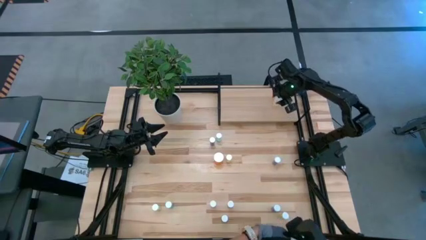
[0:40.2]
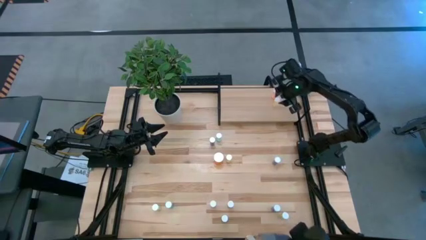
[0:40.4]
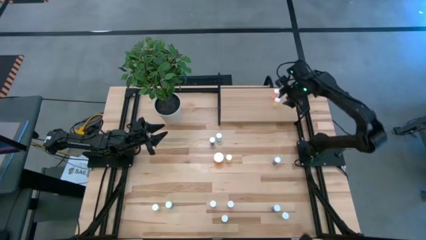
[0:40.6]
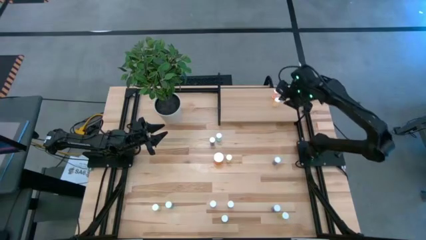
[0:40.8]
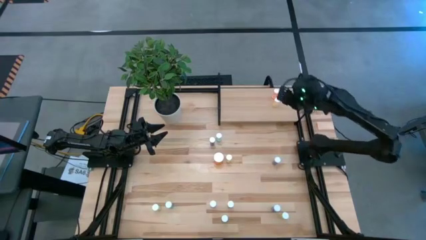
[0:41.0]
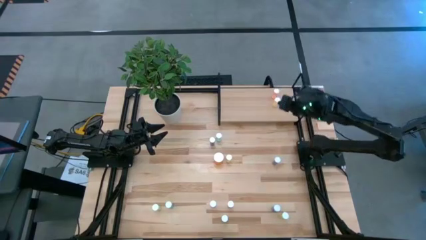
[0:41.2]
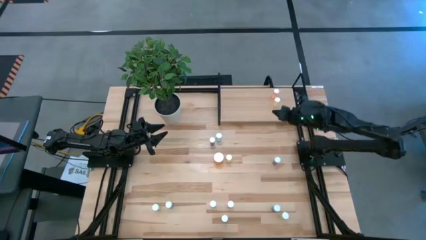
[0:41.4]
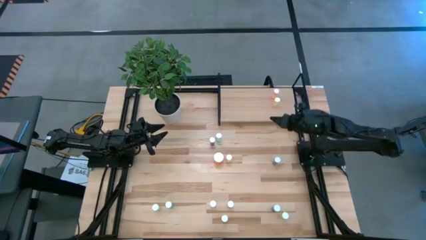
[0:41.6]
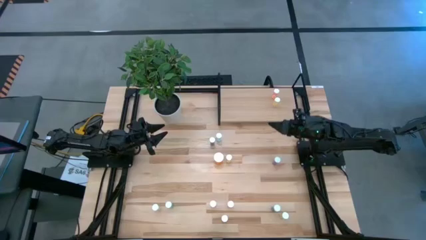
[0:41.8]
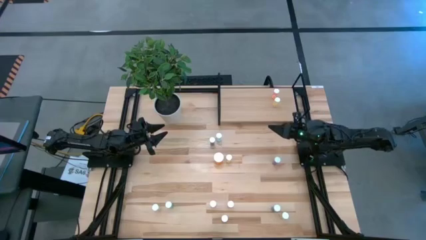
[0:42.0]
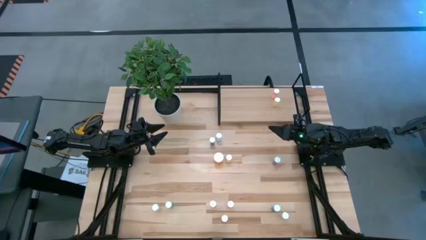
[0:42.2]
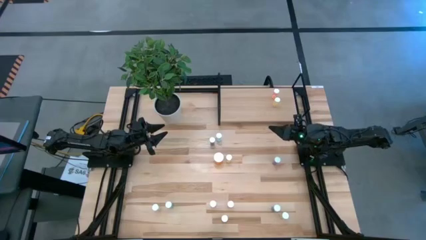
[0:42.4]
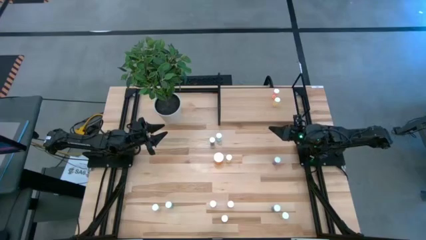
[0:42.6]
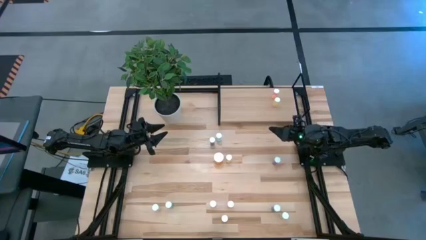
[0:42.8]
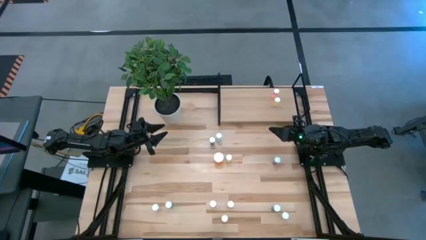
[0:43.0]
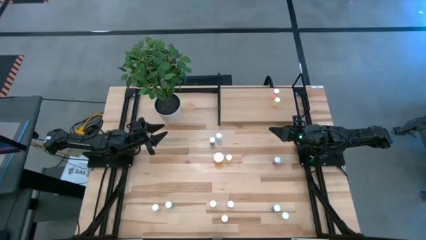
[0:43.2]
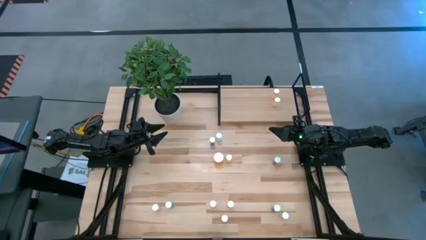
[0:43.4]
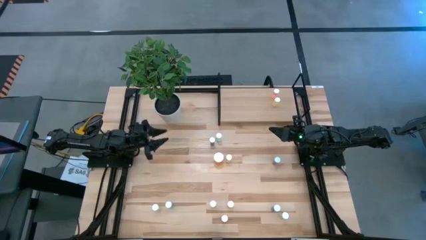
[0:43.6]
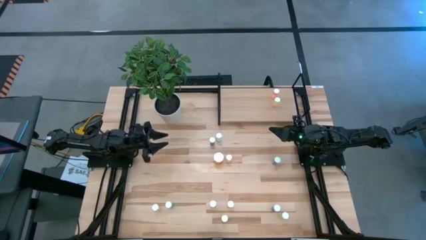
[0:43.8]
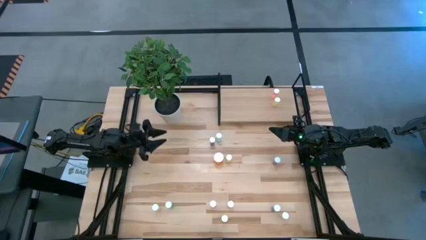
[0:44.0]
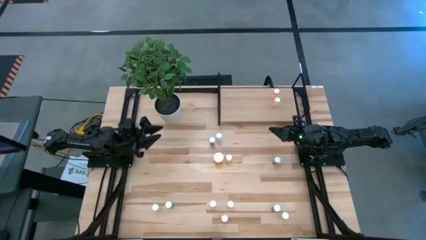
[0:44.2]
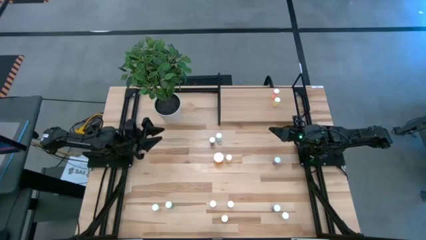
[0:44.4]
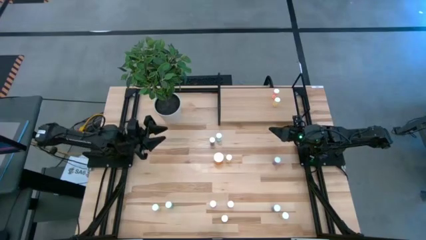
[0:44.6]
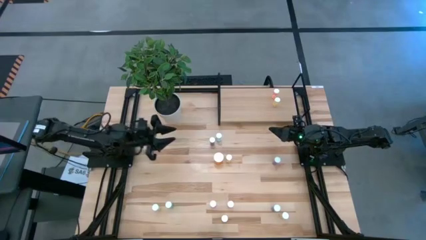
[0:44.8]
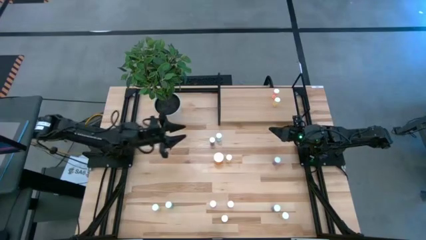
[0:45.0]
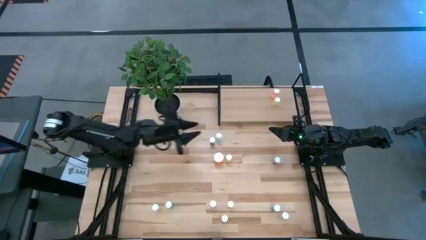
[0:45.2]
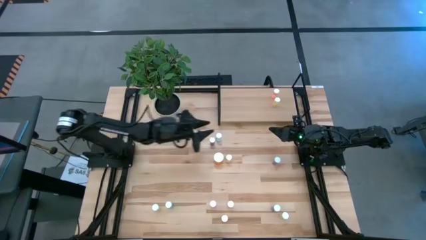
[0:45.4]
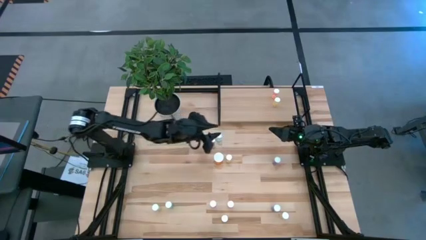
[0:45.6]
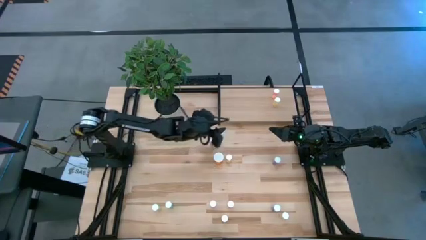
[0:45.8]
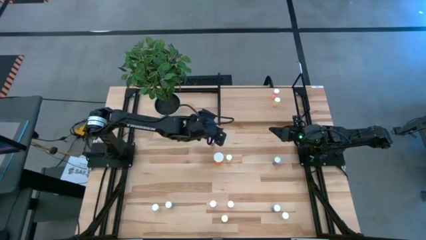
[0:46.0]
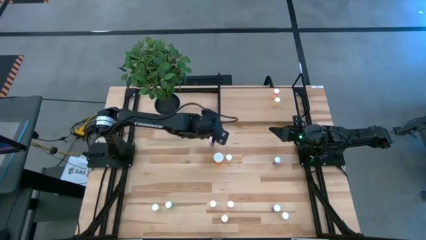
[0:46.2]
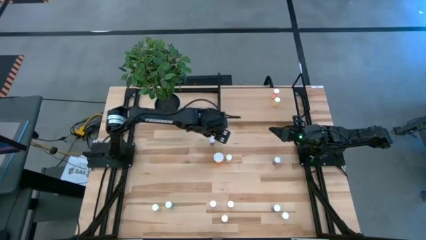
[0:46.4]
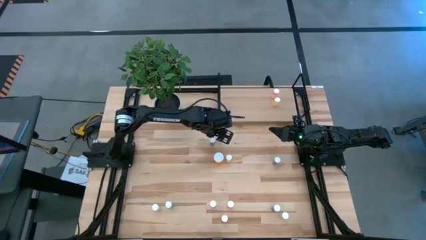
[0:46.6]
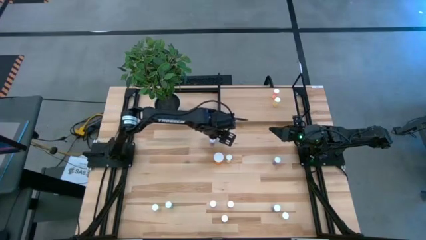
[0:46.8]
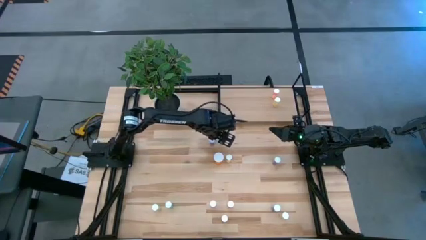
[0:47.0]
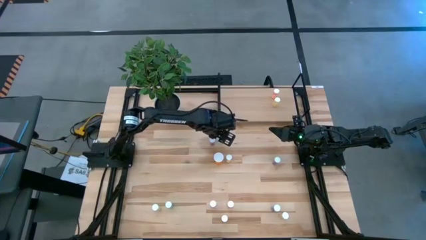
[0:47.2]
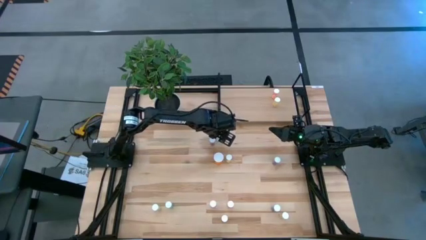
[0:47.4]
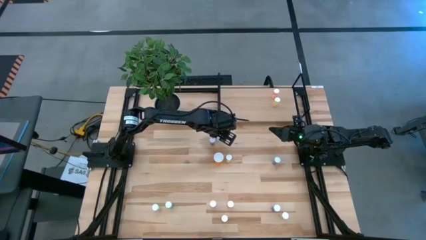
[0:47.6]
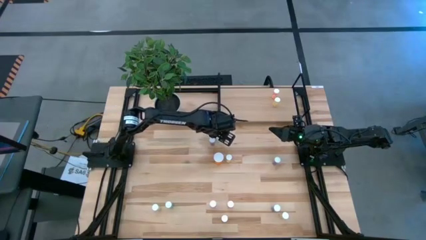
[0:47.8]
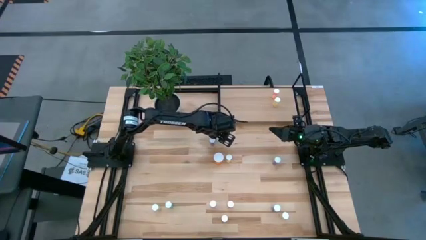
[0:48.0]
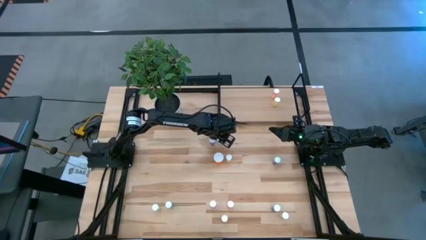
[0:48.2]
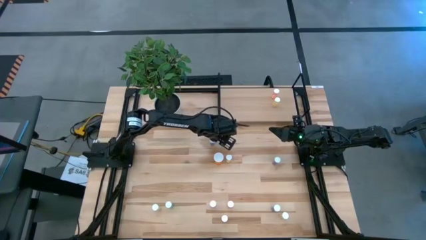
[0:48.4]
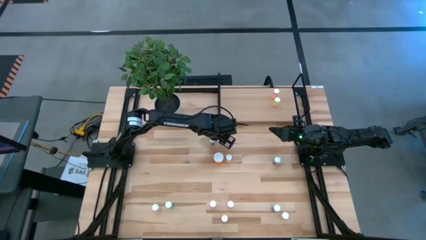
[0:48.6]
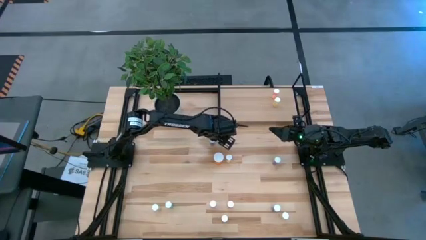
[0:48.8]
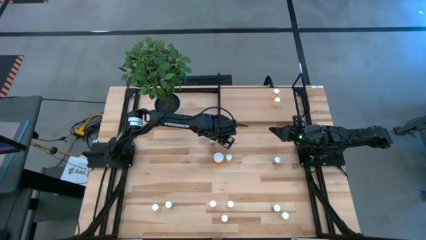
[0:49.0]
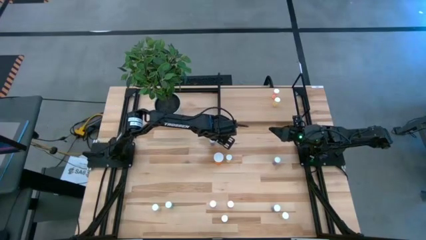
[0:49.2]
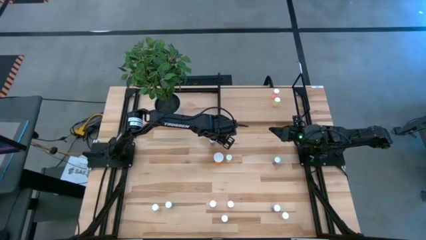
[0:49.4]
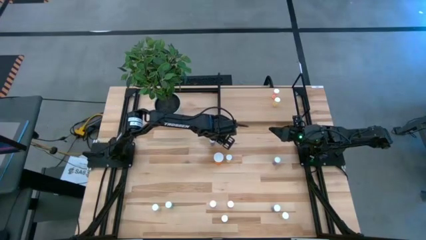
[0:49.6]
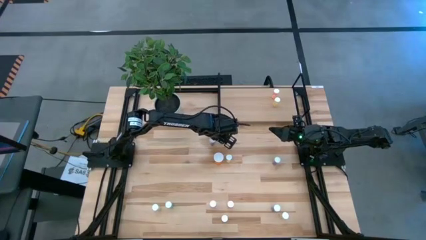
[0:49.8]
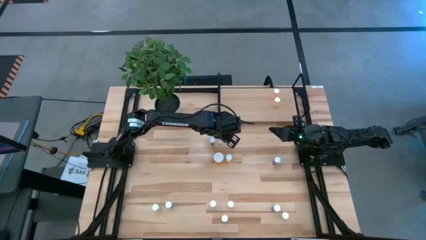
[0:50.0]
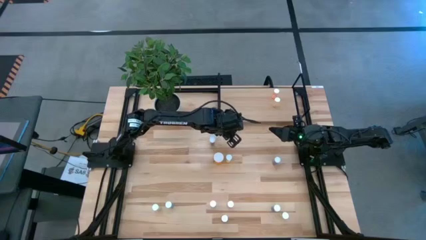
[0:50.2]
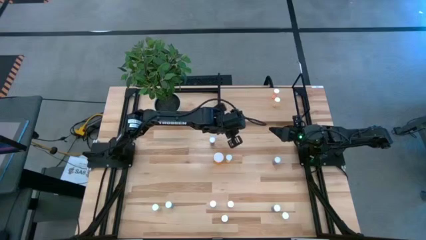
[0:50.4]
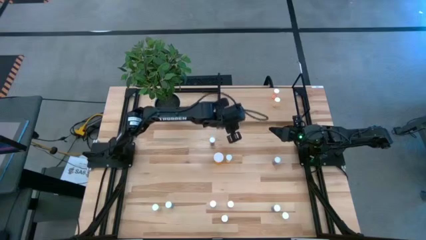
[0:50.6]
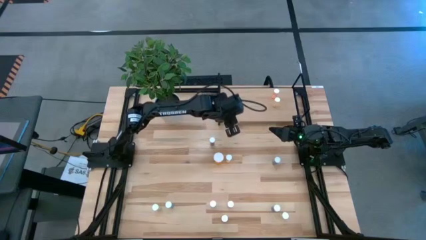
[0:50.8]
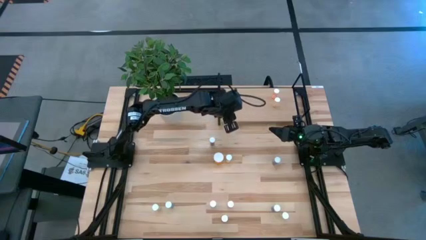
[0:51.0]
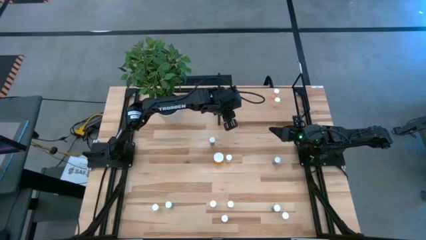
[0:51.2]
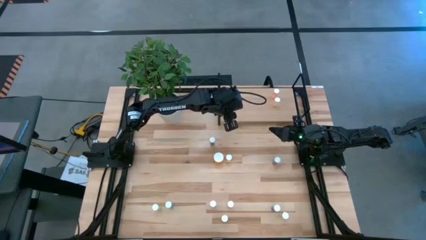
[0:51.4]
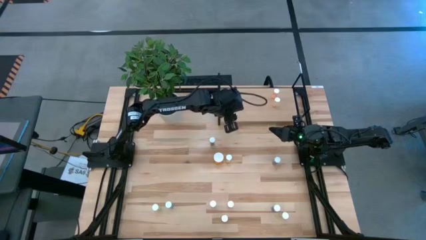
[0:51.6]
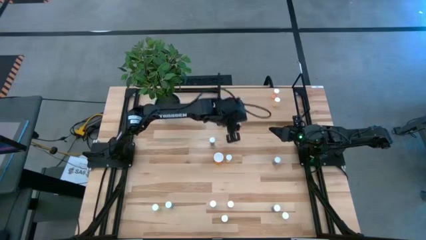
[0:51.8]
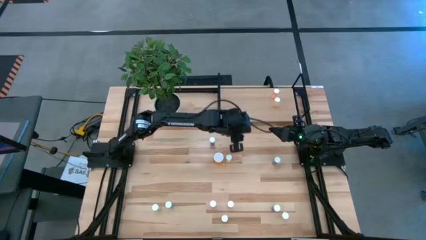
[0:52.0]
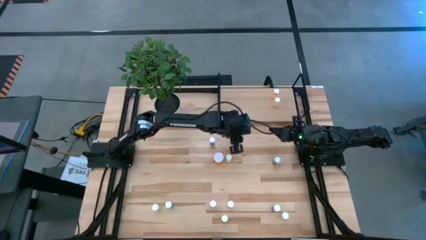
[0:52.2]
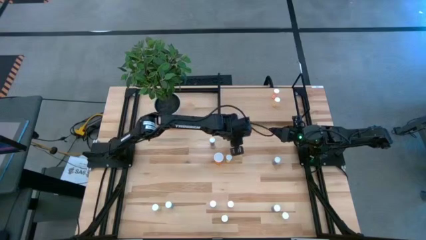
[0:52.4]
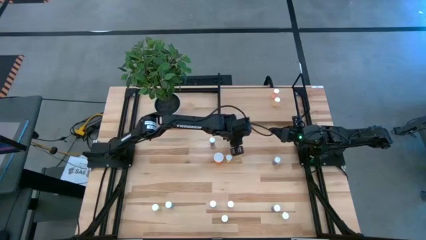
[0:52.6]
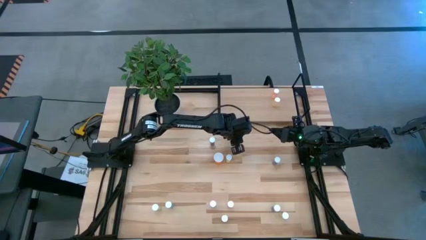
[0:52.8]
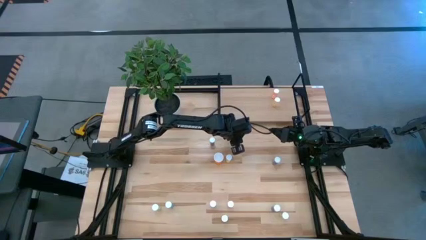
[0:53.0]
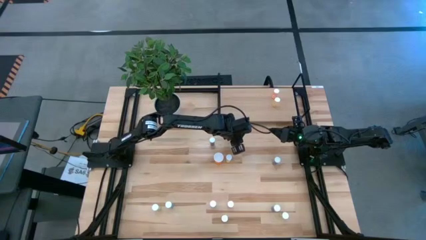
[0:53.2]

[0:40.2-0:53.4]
Task: Pick and place medicine bottles onto shelf by color
Put the green pill bottle on the shelf

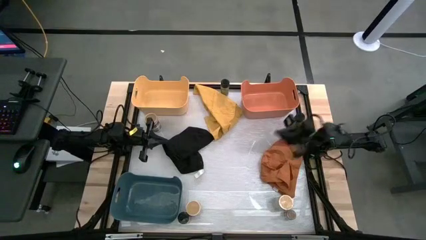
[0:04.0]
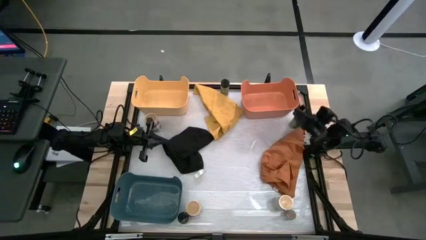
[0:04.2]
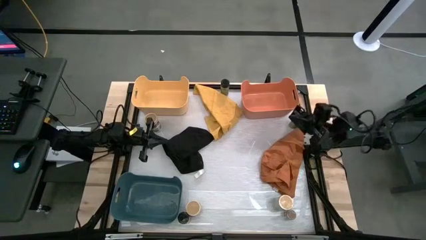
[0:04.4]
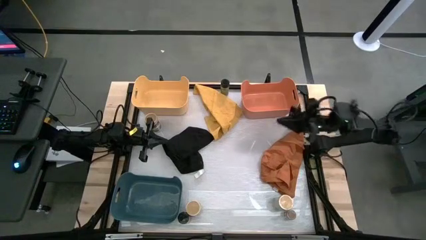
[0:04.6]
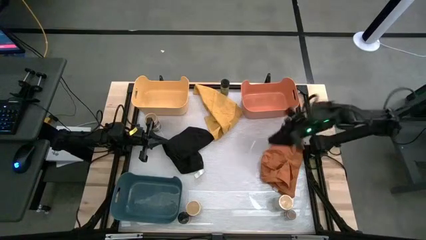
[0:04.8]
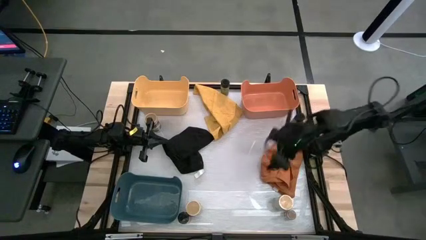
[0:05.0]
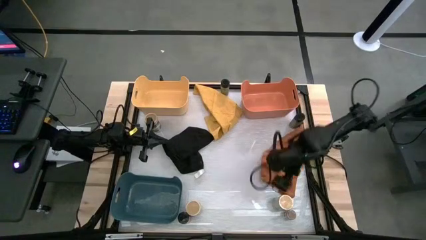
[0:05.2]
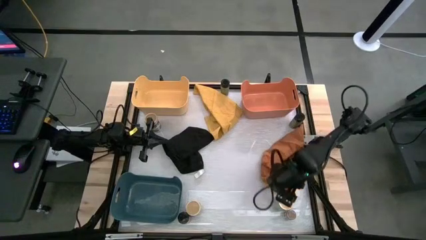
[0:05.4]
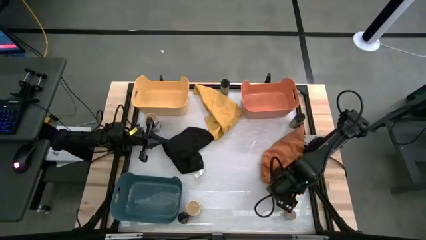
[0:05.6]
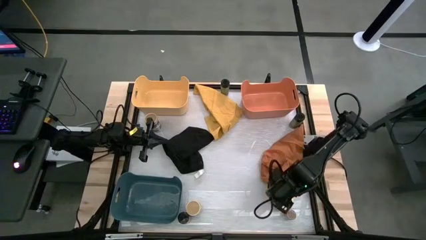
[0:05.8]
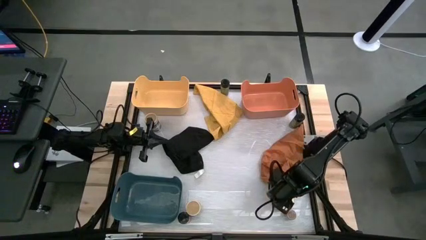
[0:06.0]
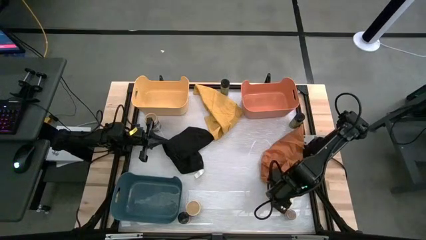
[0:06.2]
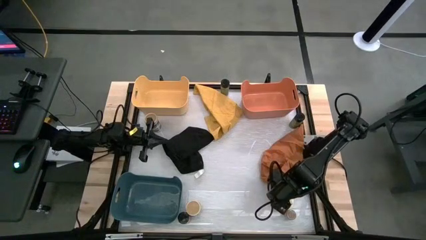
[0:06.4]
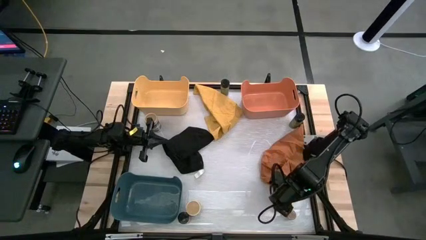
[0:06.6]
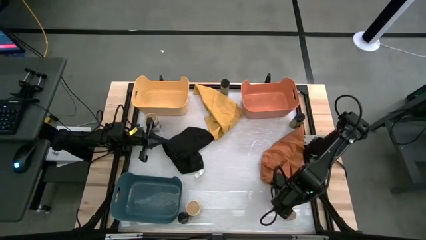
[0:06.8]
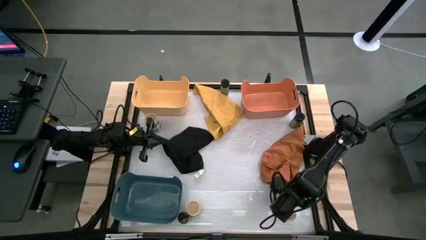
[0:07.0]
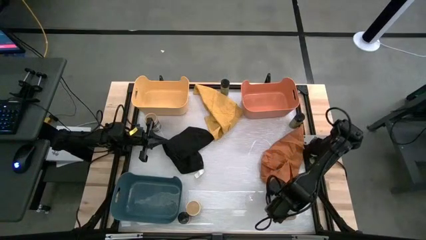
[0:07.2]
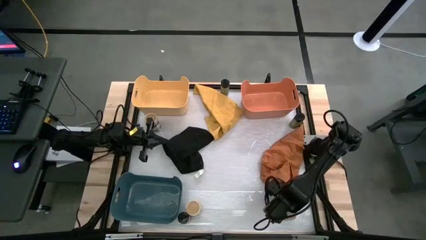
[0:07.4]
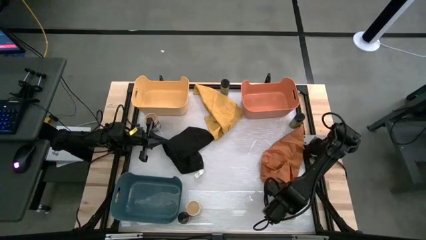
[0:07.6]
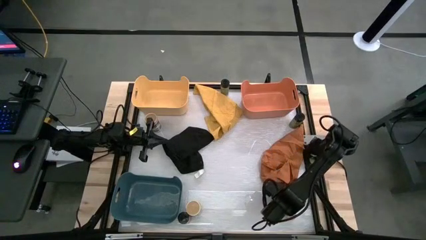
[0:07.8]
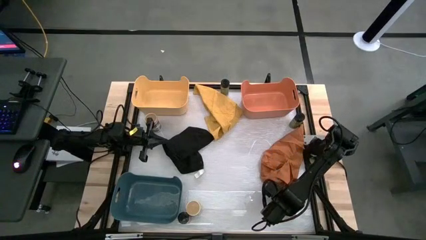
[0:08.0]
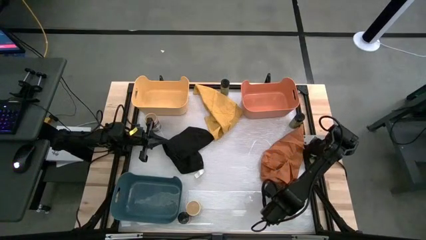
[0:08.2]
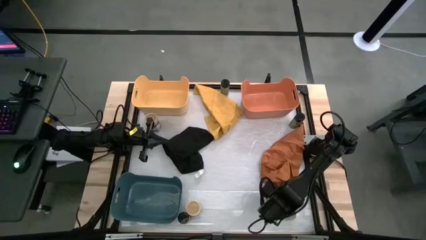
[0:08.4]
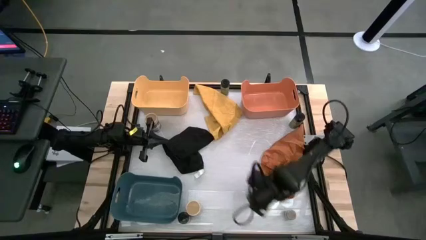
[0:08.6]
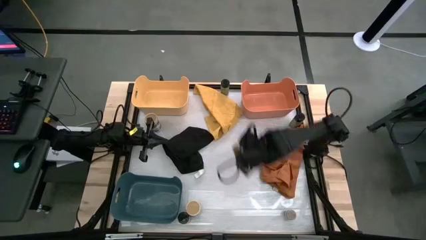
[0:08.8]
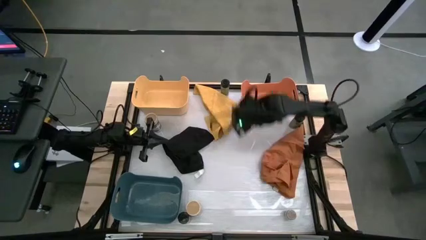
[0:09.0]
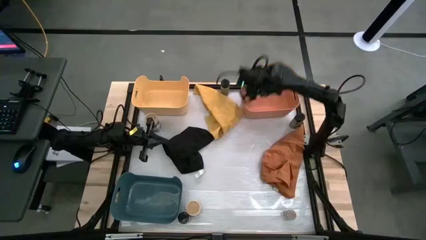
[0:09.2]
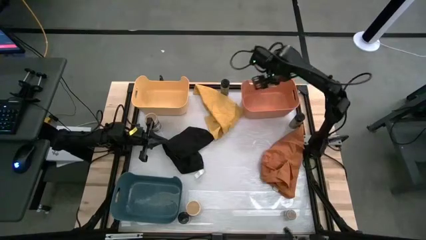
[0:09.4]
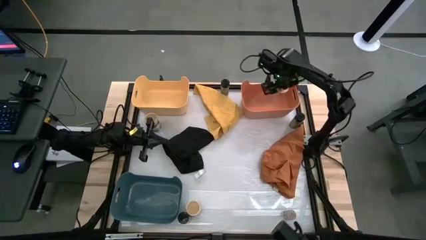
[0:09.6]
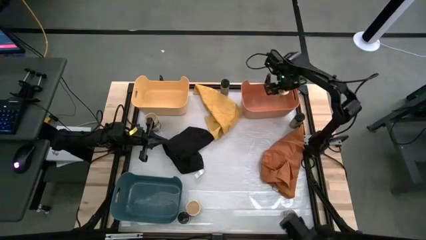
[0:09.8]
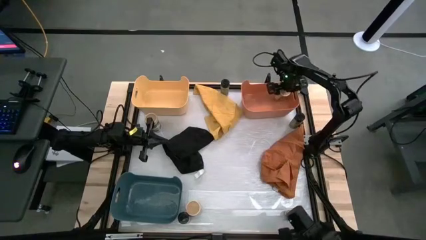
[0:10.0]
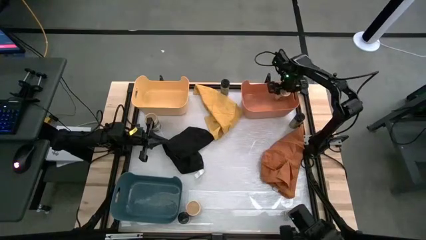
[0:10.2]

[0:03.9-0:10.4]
Task: Sort spices by type
Put the right gold seasoning bottle into the orange bin
